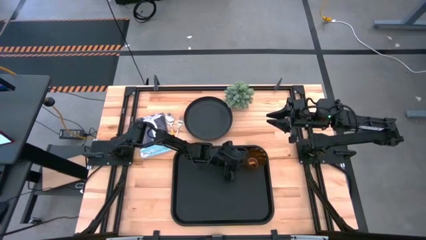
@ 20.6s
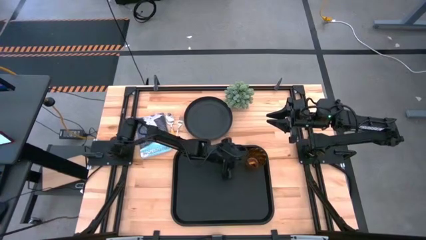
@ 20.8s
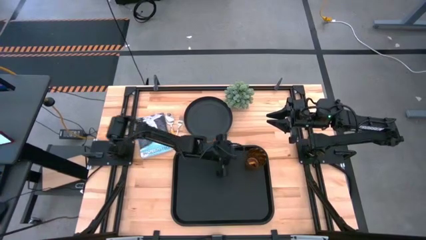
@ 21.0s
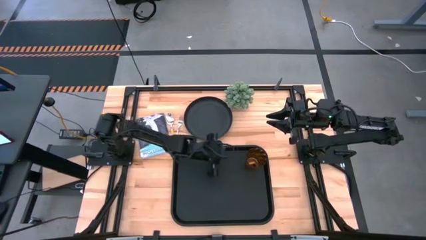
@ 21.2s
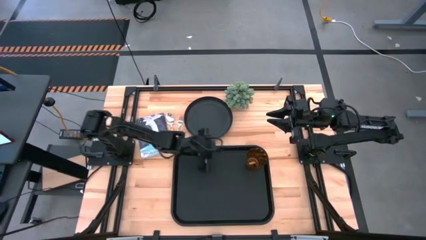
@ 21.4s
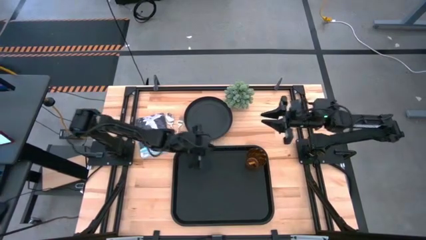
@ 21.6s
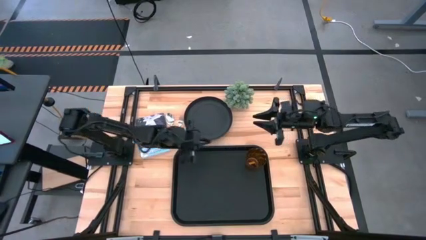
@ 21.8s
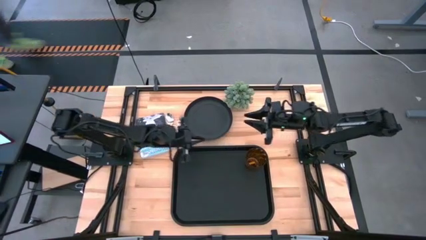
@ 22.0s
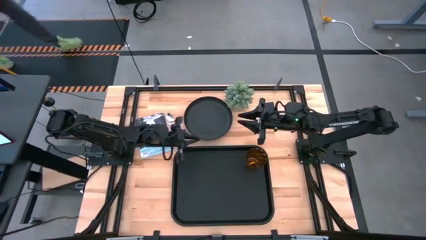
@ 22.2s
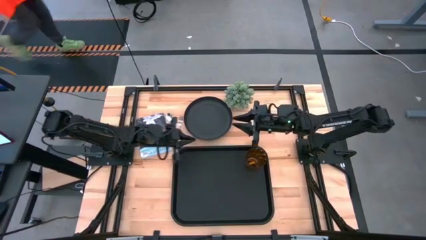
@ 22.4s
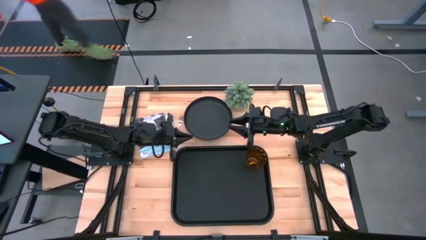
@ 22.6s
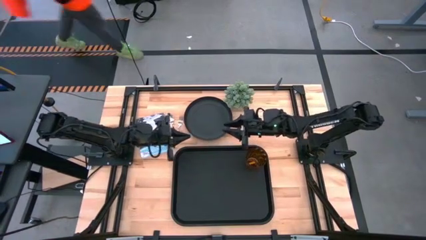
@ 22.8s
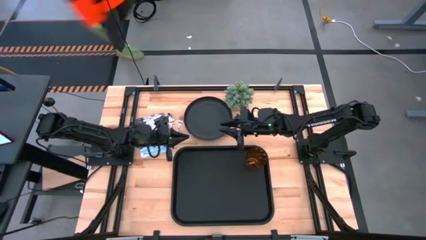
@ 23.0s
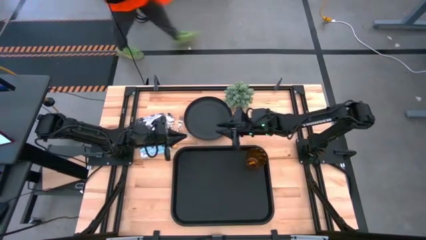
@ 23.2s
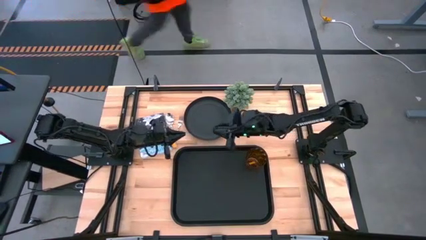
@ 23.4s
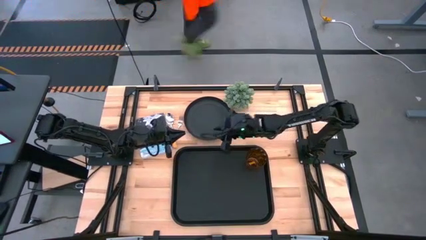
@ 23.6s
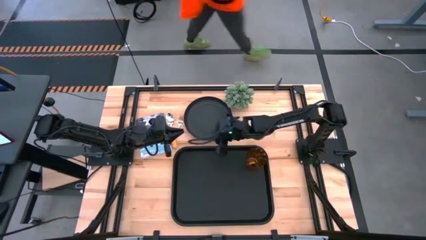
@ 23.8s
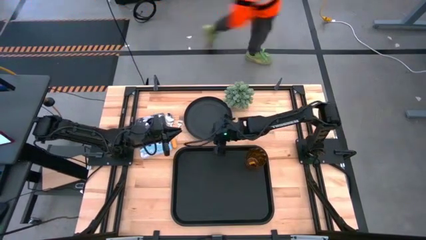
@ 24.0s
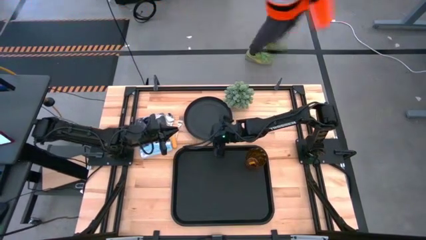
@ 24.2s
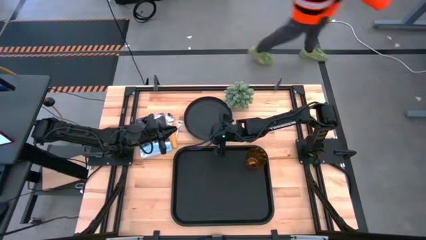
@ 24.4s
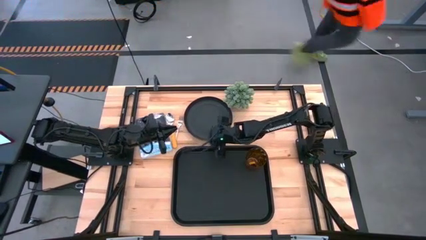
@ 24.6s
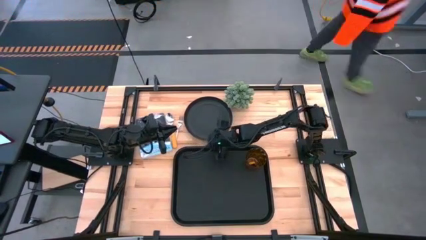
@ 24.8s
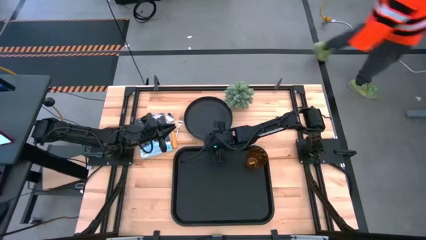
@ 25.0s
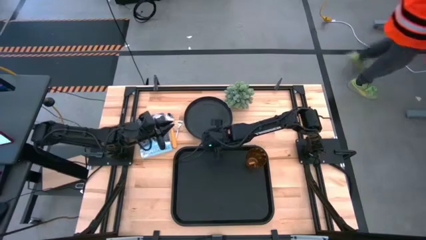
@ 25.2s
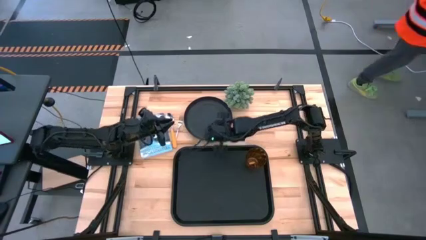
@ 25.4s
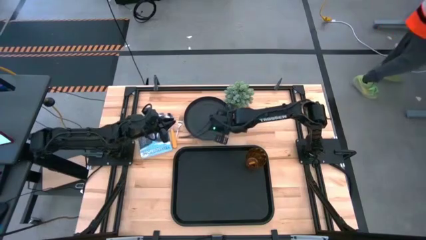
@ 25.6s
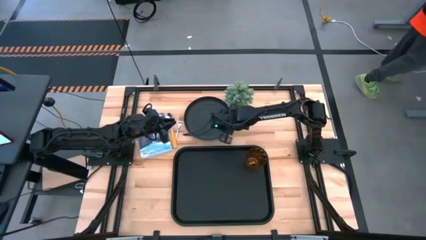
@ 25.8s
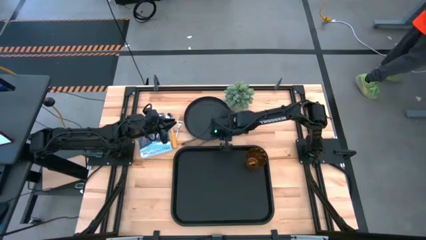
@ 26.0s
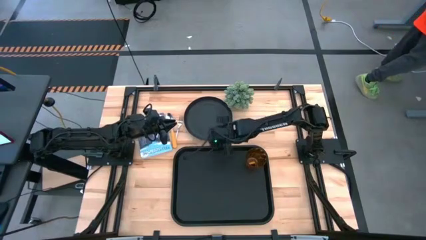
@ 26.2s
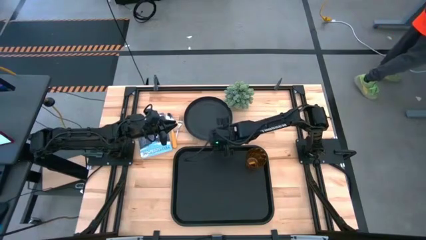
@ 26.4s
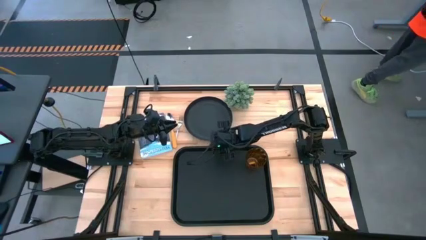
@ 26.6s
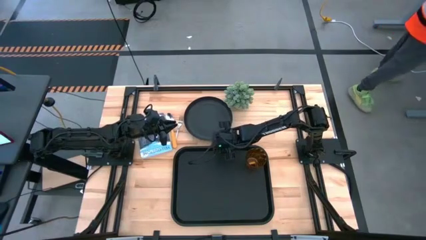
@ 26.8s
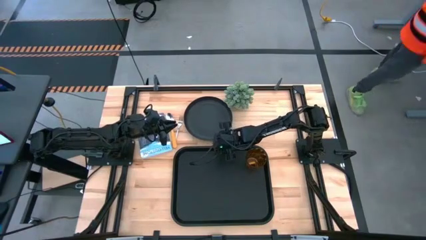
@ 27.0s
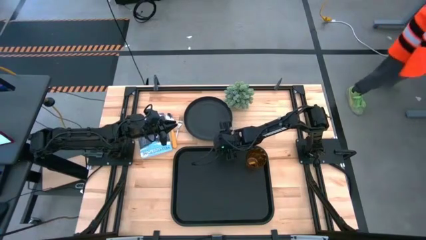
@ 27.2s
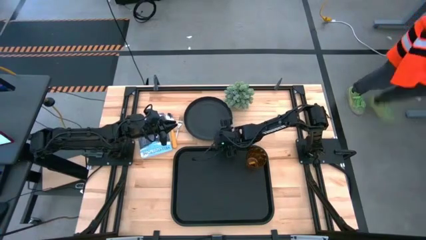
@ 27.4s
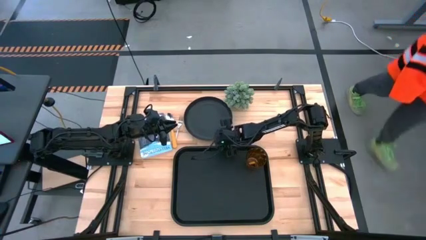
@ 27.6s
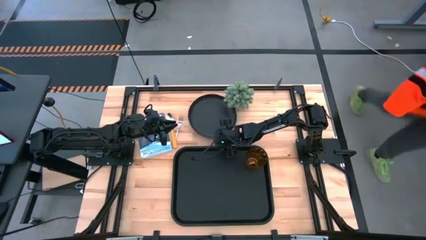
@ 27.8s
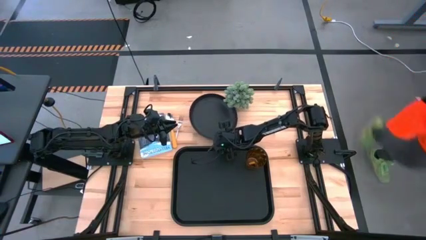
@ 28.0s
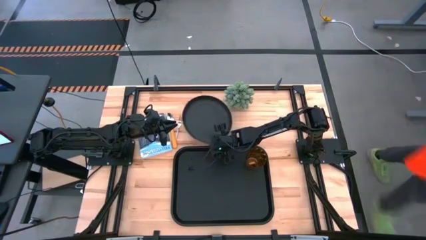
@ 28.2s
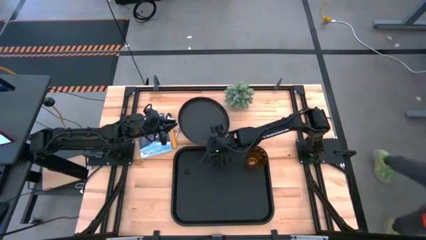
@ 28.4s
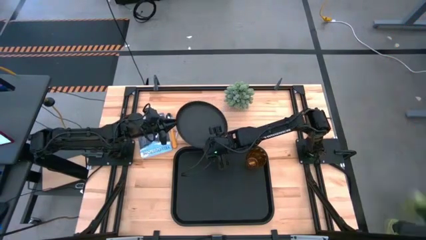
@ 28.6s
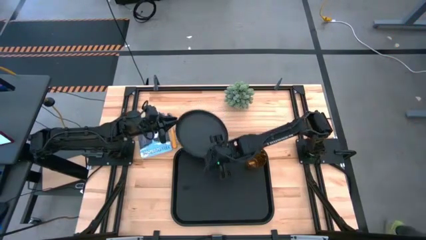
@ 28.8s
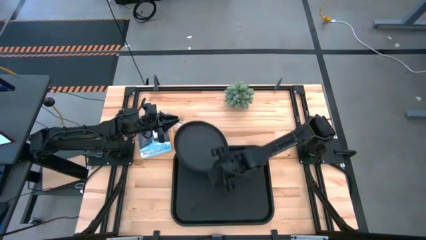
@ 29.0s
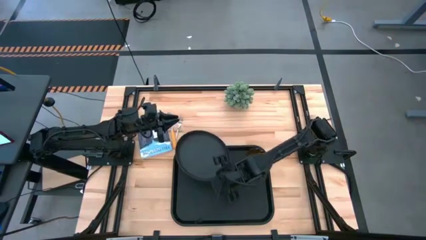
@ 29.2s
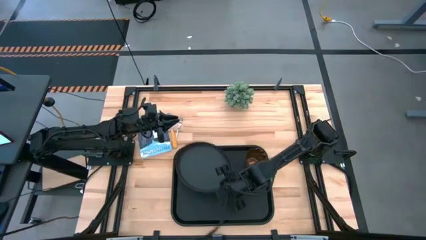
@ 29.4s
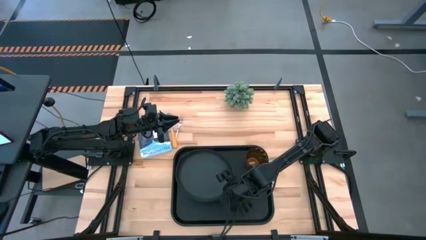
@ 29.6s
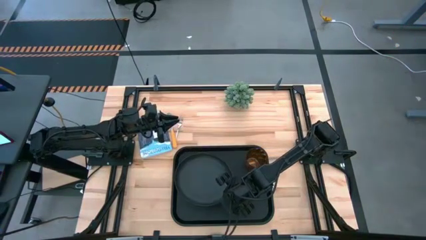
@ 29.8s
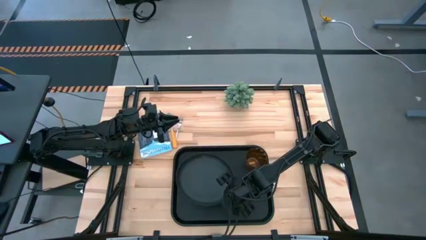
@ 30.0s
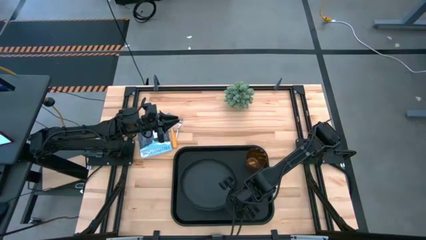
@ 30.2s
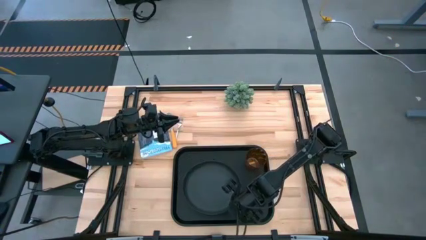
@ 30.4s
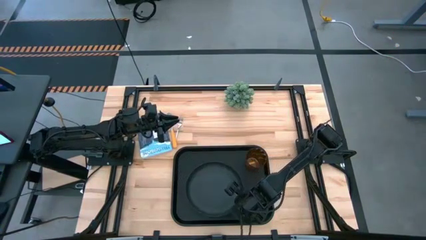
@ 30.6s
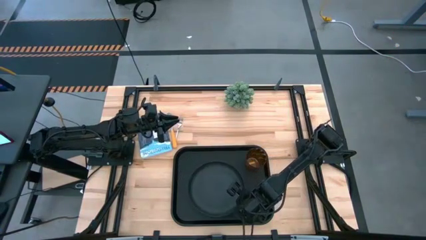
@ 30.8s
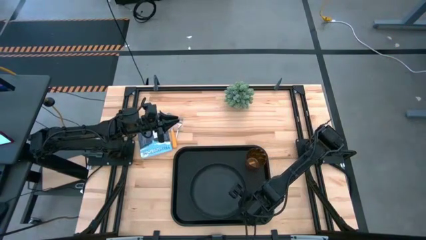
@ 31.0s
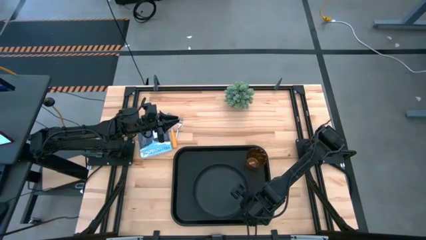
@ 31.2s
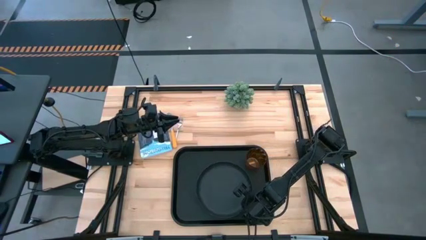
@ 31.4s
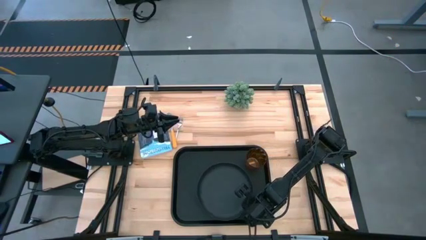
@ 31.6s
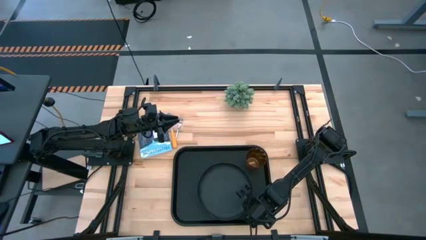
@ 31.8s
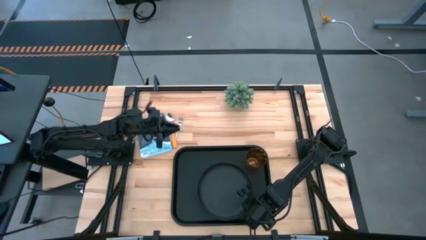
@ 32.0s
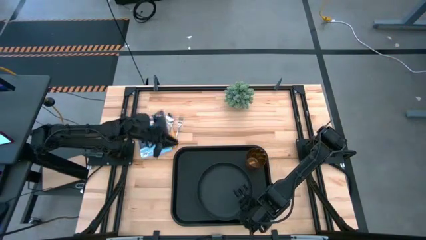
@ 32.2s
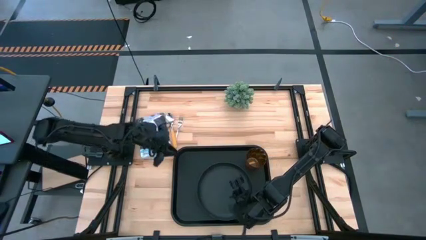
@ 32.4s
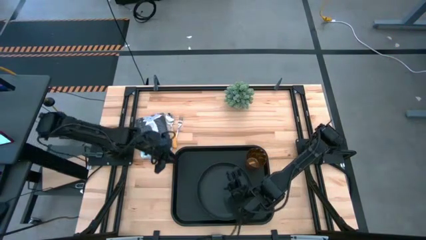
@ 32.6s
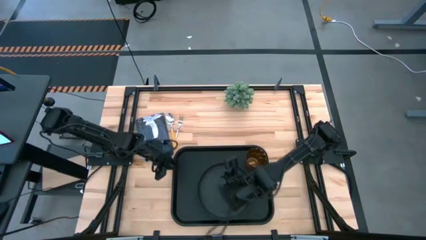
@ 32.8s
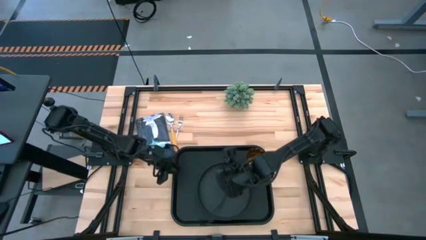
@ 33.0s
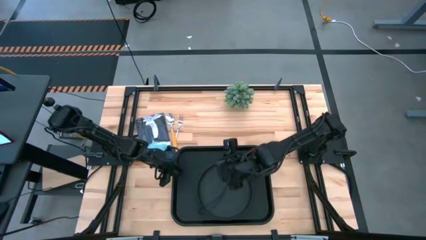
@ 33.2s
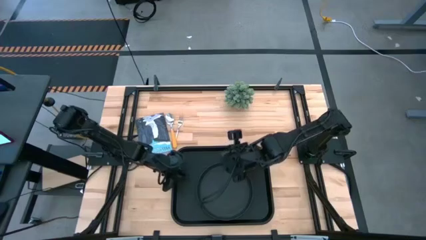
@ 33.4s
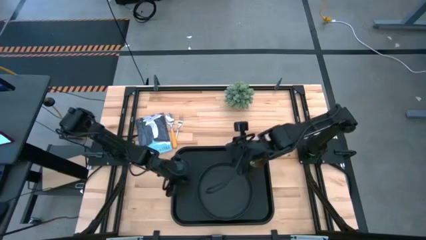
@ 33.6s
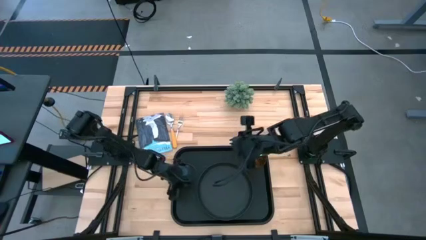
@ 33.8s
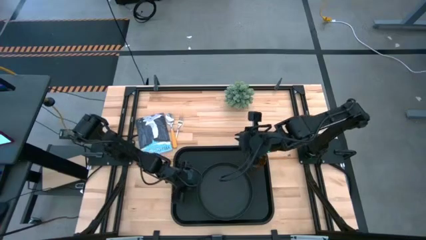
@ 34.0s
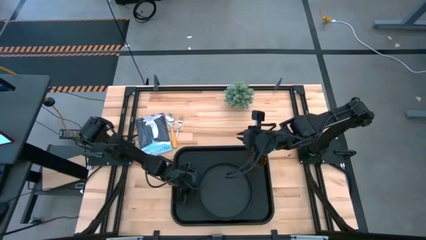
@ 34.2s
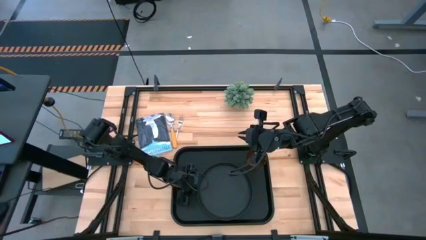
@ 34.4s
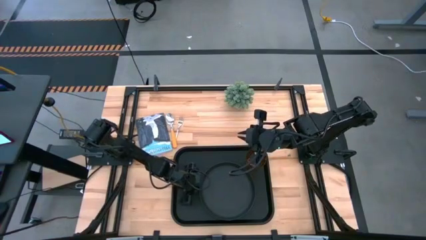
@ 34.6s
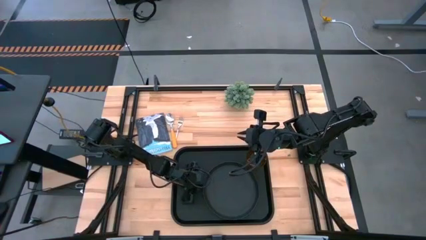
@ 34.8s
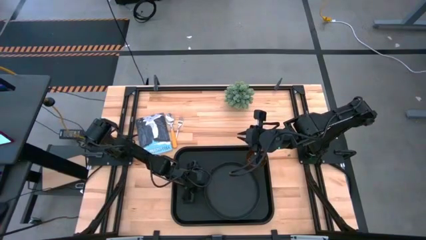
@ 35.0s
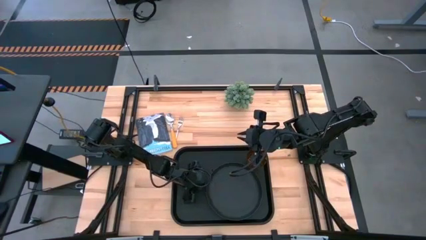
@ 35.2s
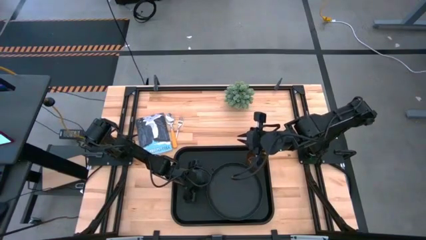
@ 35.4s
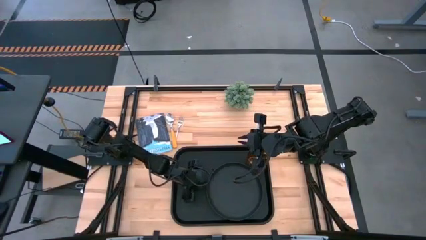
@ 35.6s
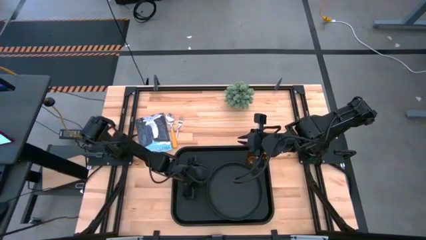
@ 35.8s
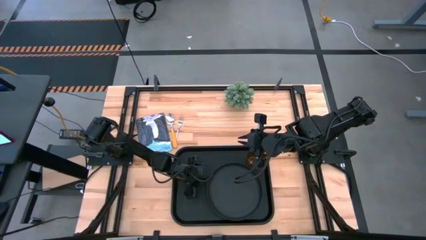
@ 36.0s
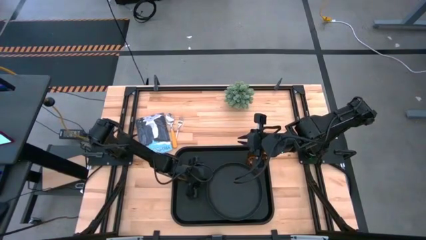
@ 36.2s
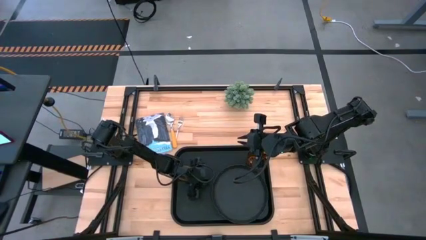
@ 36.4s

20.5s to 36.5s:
Task: Pick and place plate/cup/fork/spoon on tray
Put the black plate on the black serving tray
